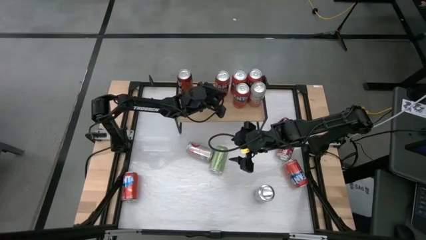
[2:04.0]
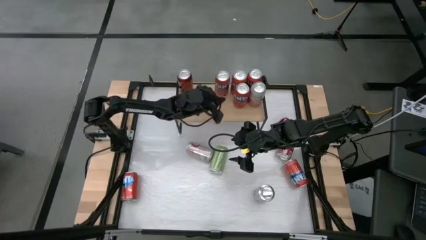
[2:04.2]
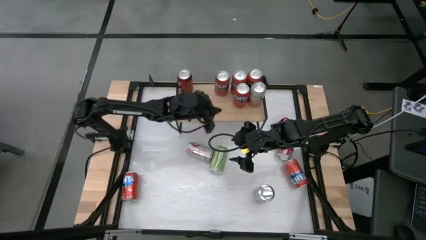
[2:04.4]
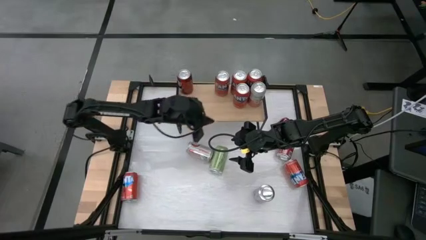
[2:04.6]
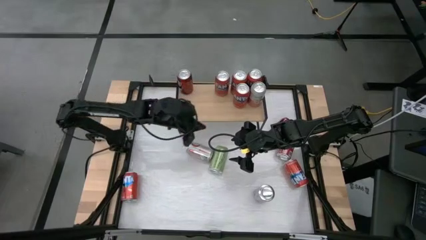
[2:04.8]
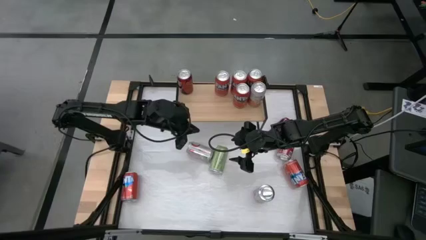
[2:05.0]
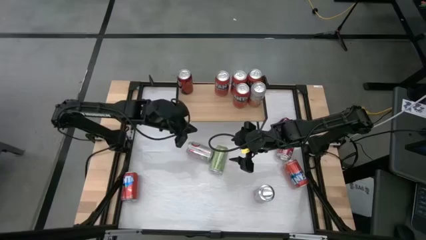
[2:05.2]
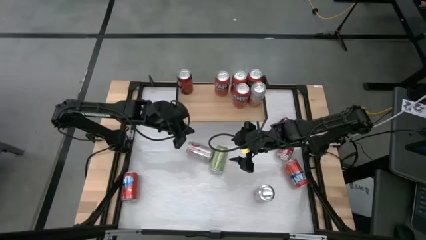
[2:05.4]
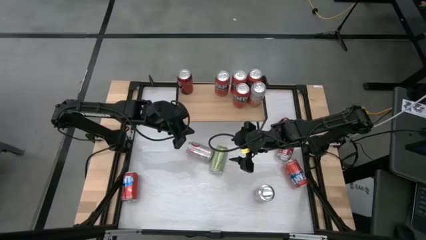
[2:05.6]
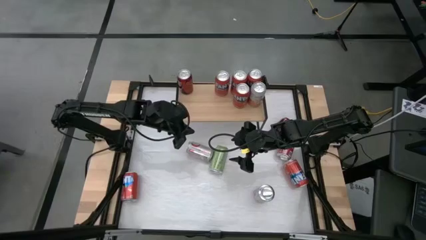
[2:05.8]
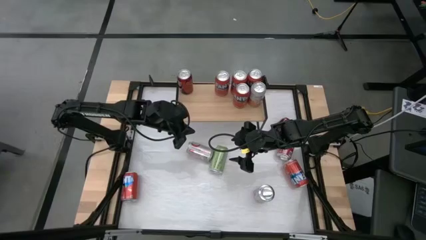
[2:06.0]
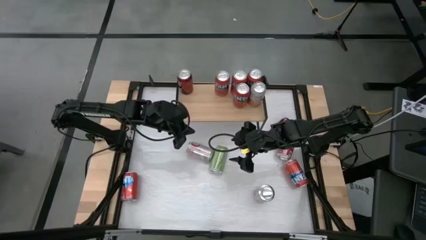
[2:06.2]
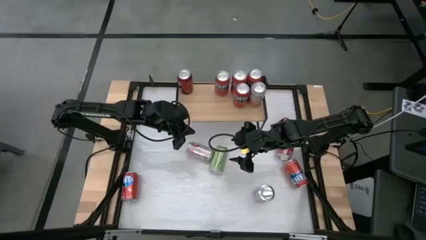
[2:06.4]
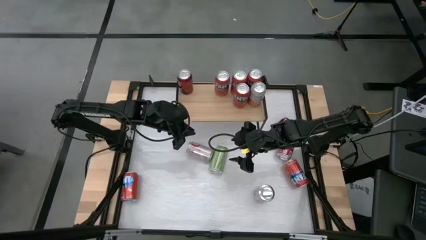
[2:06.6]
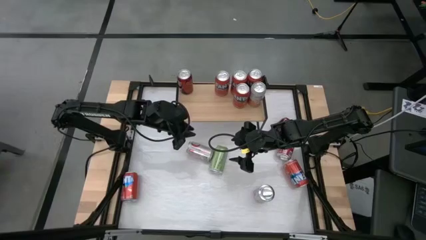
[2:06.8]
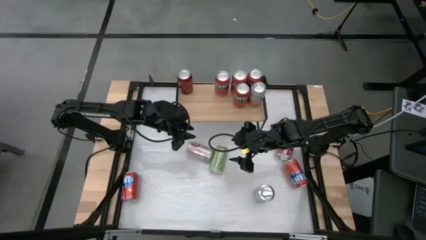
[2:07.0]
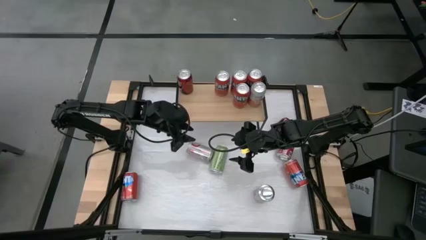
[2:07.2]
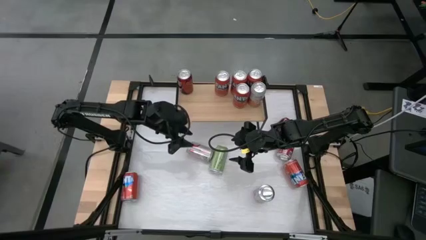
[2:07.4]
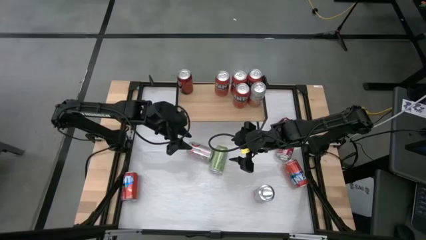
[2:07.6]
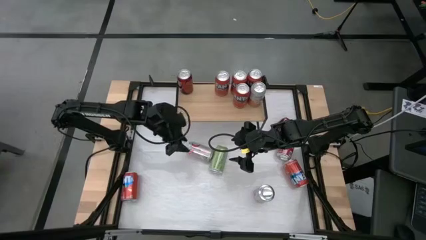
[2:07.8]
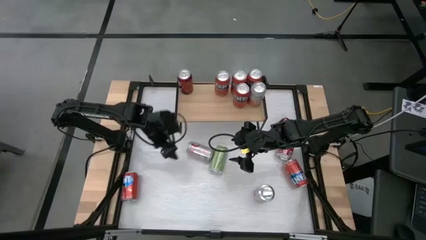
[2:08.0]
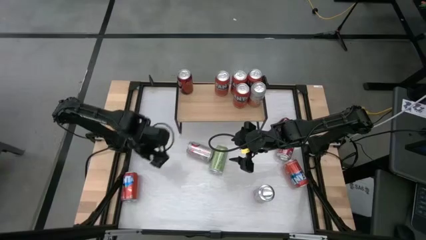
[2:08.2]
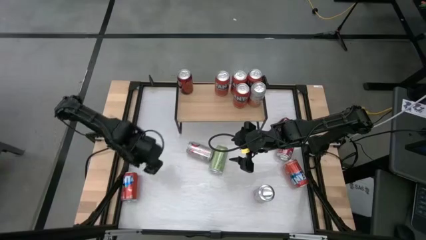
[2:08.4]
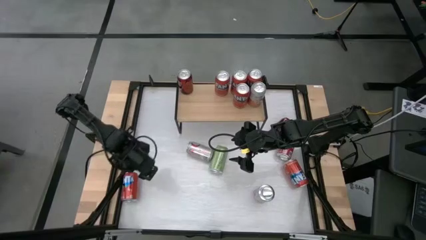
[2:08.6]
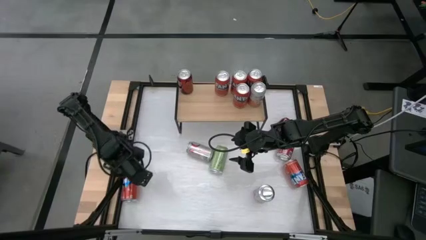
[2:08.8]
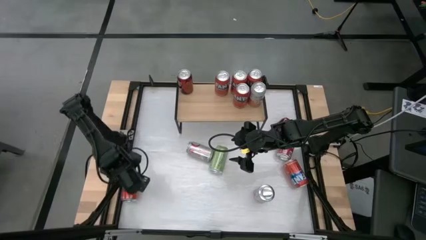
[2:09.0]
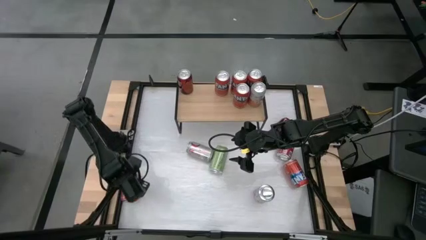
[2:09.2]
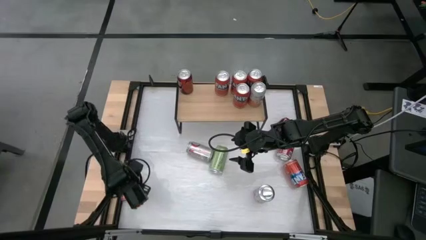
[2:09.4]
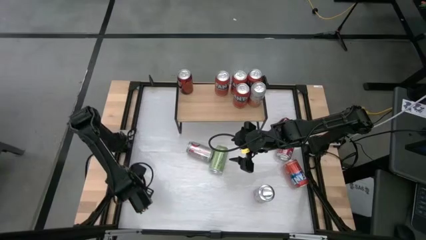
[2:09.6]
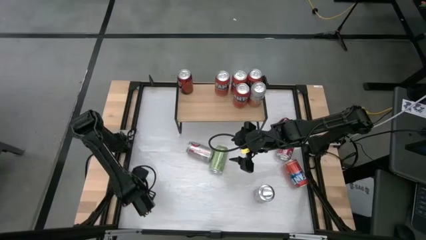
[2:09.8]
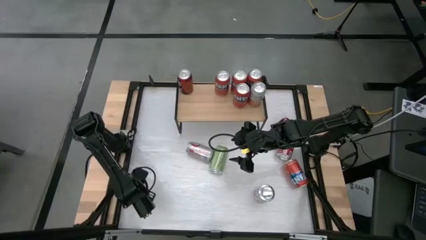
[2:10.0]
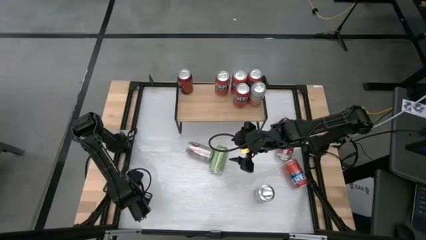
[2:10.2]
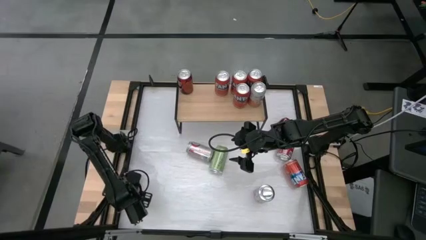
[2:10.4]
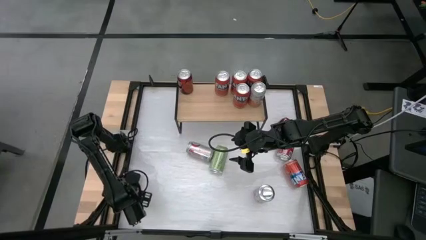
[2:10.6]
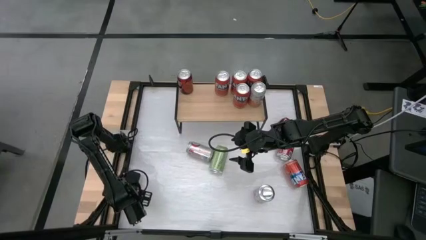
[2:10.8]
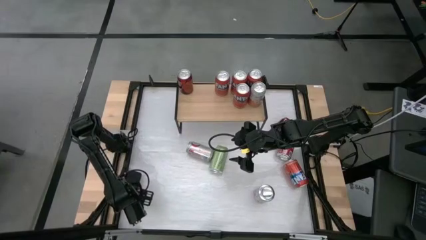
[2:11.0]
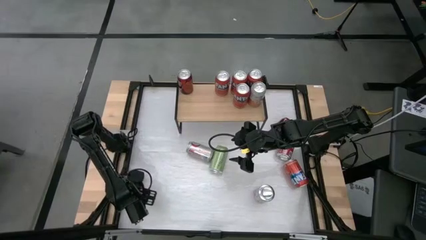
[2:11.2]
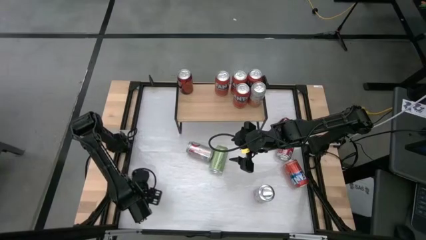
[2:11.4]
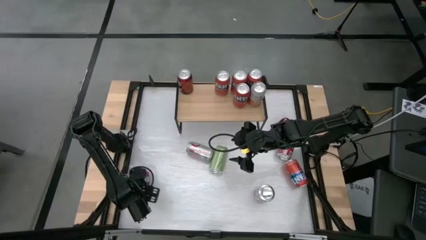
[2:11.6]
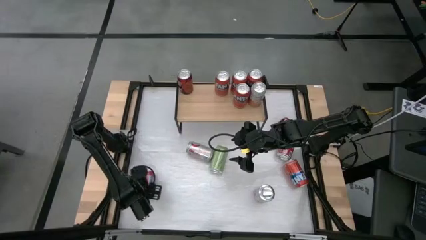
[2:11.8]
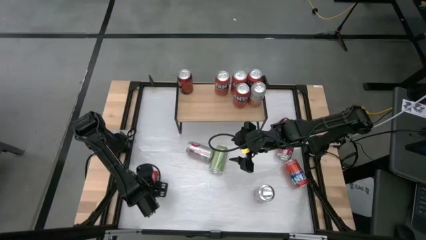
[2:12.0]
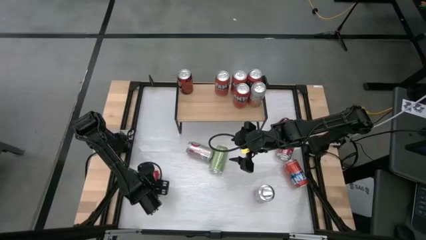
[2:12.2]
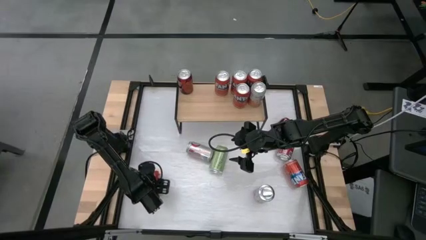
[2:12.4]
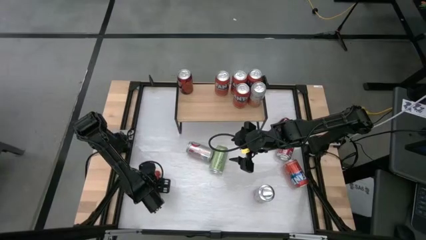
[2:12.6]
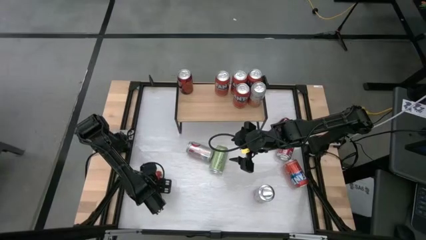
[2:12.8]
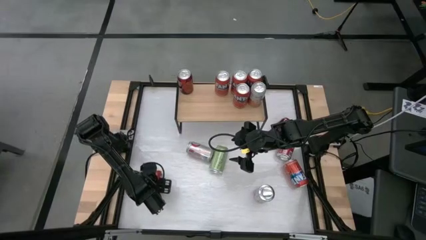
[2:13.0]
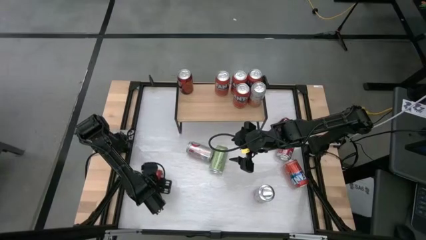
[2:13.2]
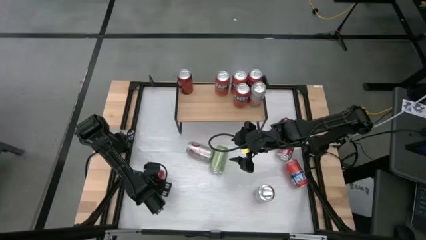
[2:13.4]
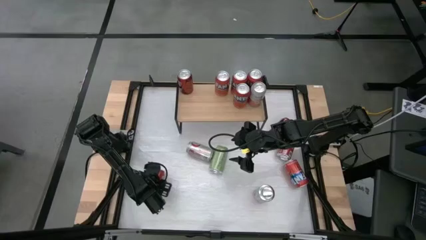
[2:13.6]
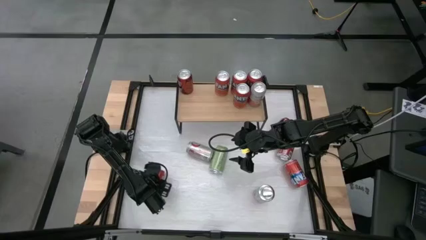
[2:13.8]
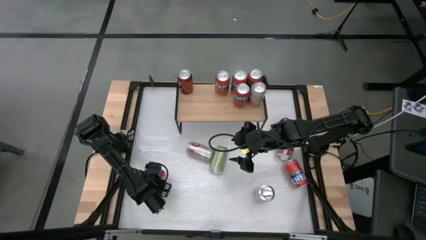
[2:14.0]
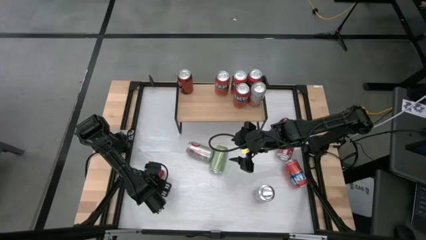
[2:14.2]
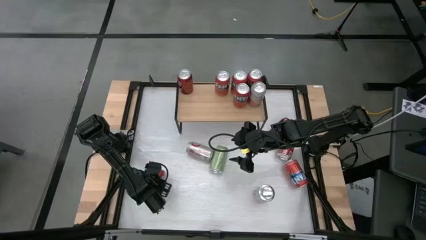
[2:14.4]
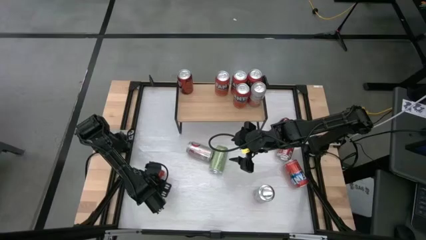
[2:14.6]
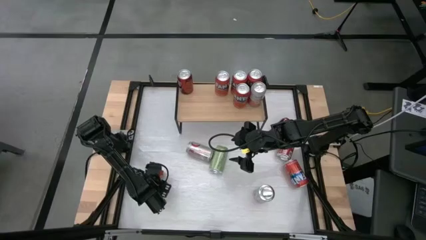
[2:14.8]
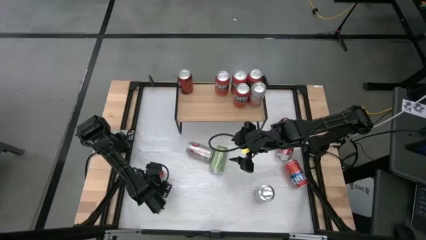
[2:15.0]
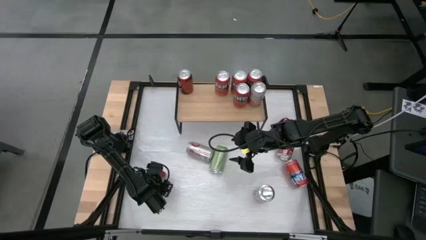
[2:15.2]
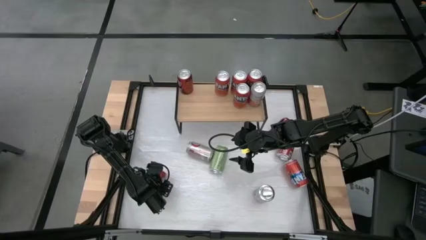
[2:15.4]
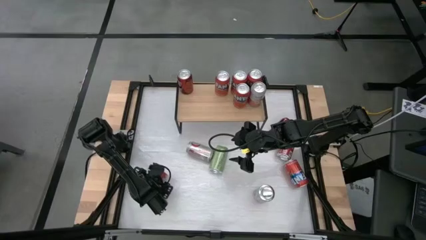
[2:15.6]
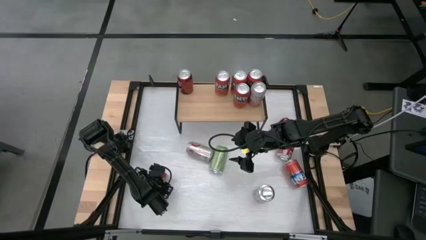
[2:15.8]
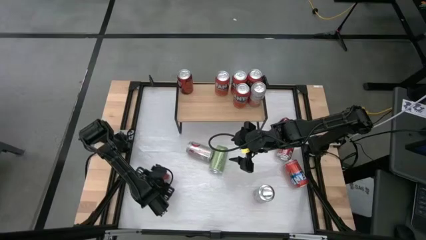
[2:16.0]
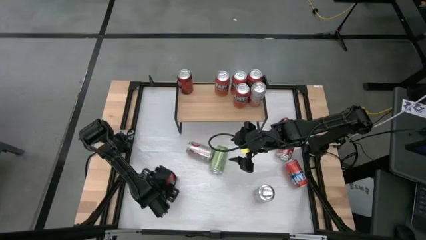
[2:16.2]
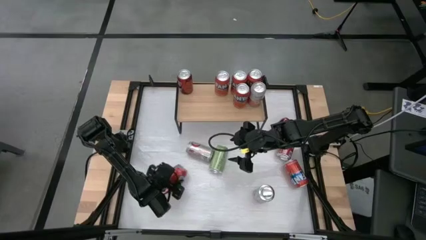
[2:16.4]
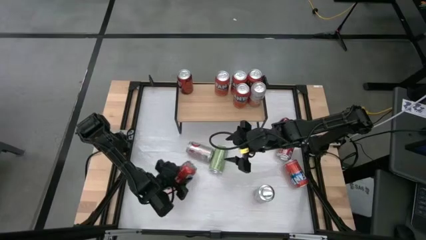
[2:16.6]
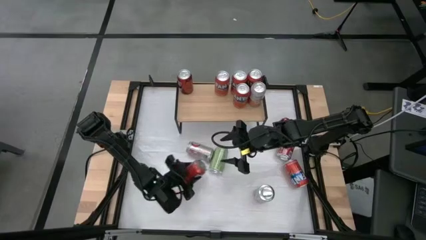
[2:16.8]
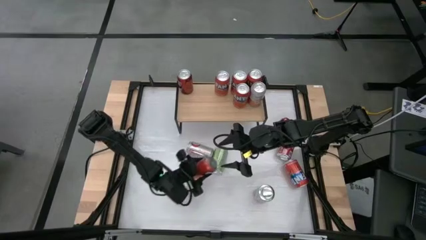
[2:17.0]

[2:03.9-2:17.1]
Task: Place canned beverage on shelf
Put the orange soda can aligned with the other soda can on the shelf
